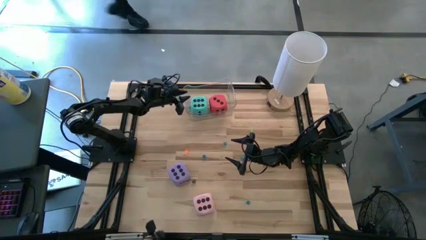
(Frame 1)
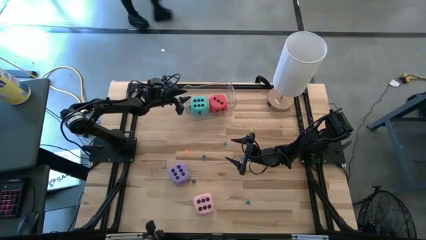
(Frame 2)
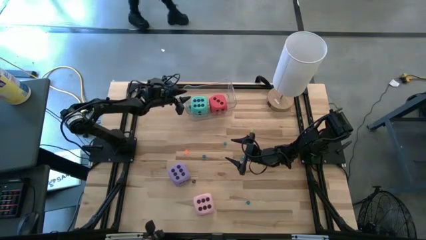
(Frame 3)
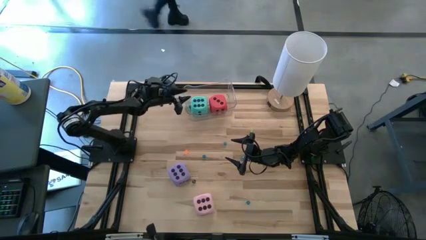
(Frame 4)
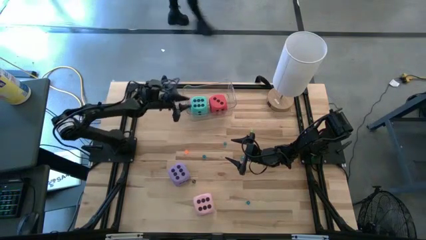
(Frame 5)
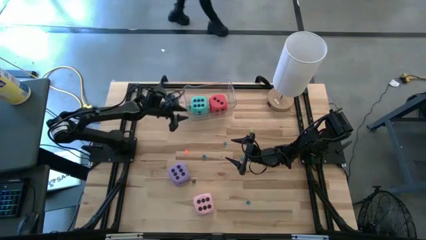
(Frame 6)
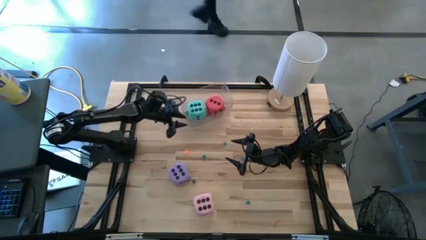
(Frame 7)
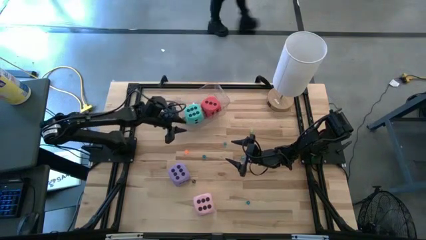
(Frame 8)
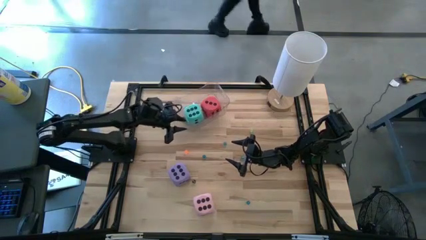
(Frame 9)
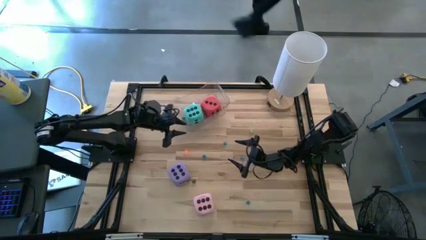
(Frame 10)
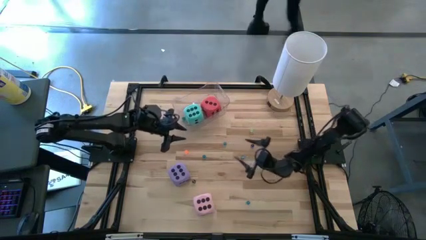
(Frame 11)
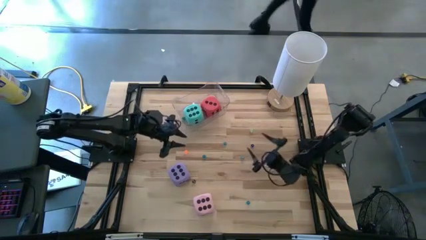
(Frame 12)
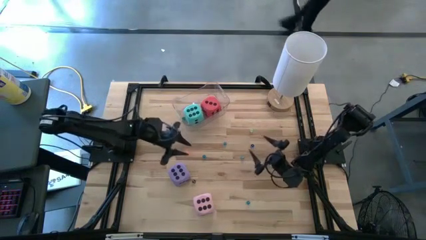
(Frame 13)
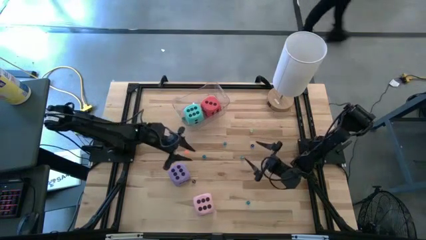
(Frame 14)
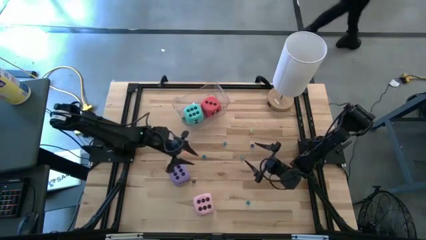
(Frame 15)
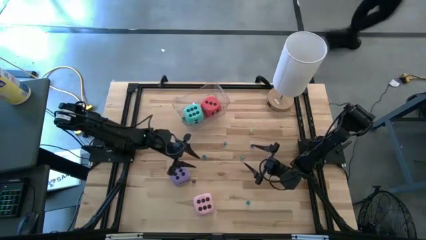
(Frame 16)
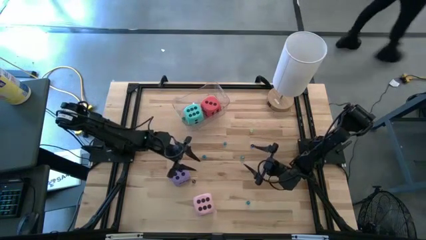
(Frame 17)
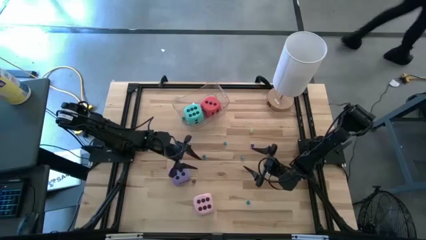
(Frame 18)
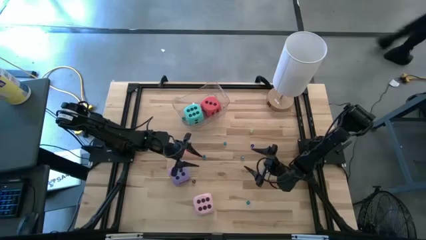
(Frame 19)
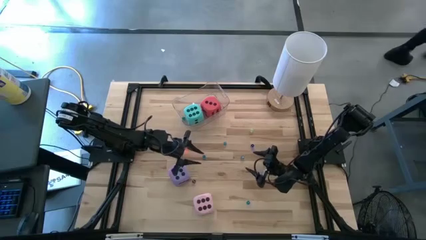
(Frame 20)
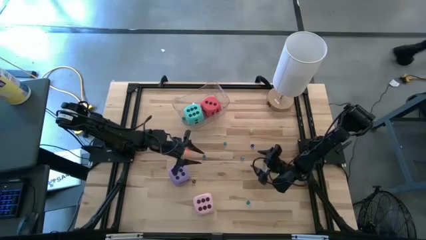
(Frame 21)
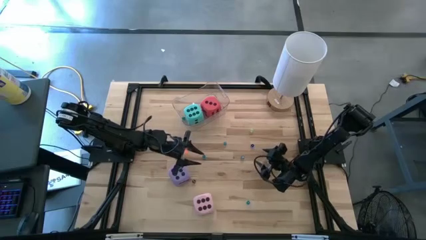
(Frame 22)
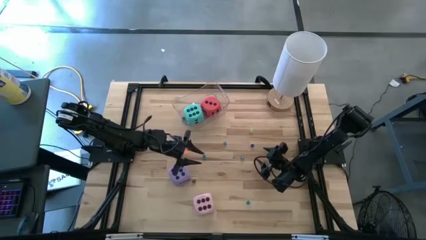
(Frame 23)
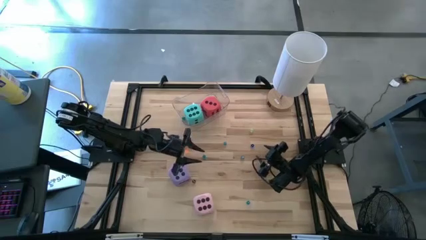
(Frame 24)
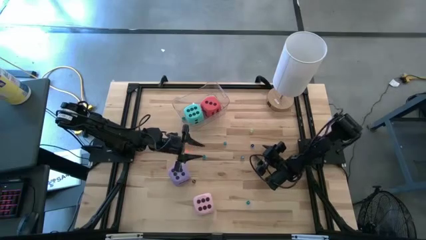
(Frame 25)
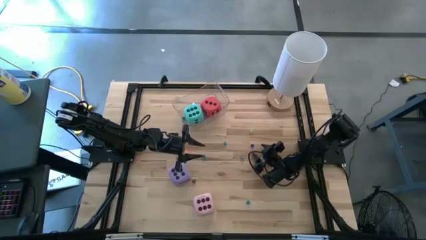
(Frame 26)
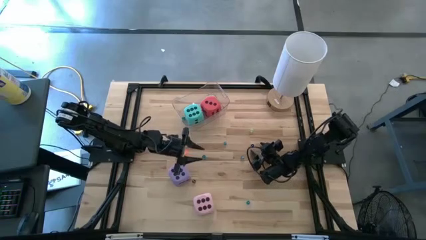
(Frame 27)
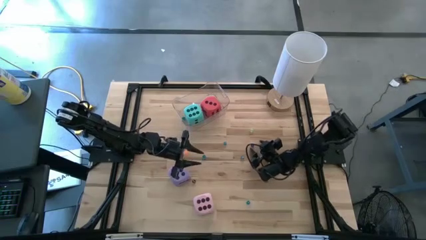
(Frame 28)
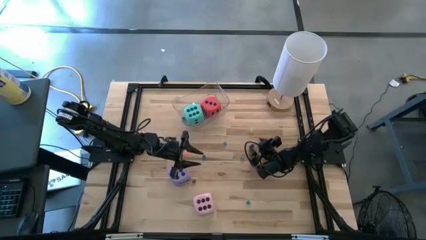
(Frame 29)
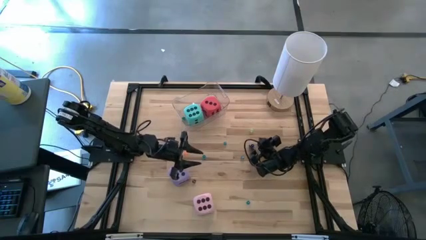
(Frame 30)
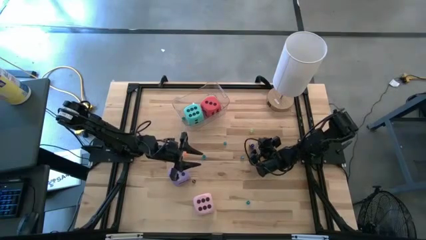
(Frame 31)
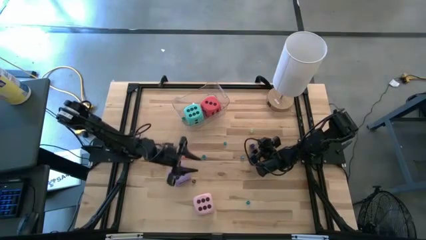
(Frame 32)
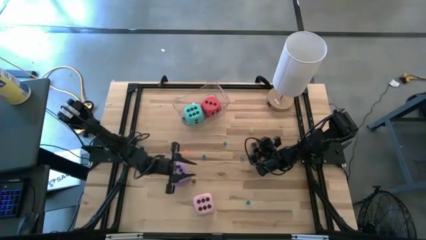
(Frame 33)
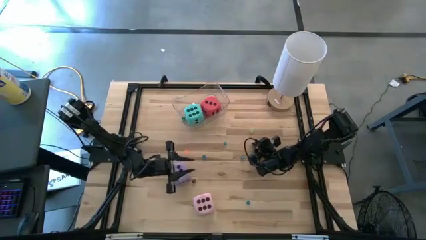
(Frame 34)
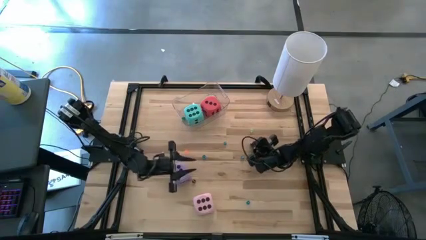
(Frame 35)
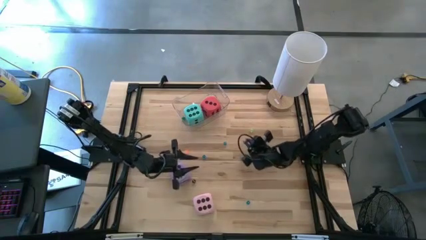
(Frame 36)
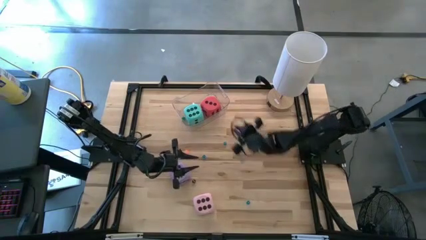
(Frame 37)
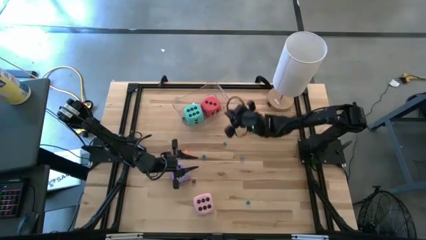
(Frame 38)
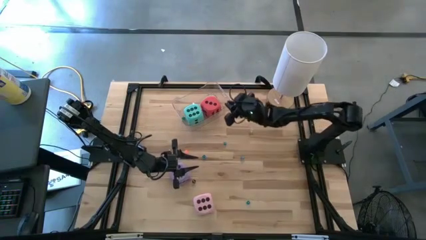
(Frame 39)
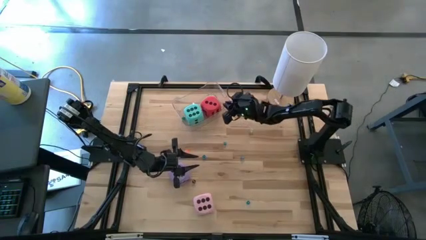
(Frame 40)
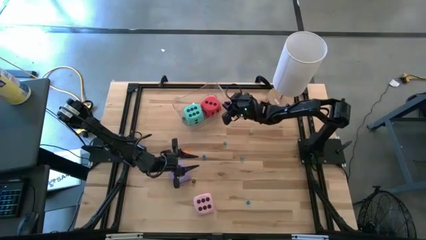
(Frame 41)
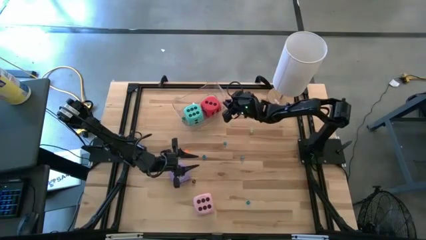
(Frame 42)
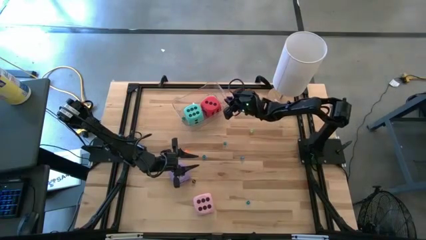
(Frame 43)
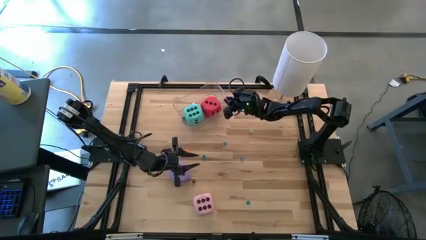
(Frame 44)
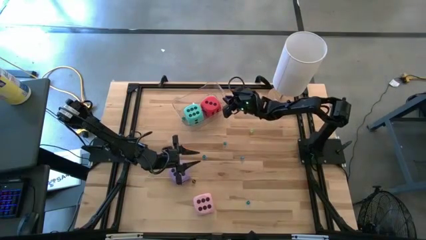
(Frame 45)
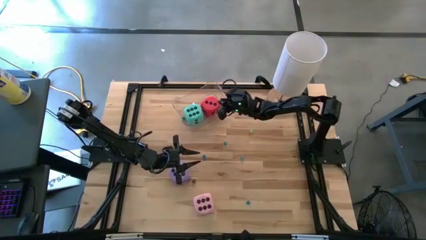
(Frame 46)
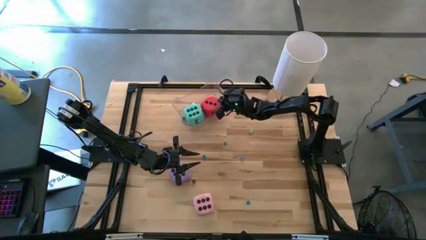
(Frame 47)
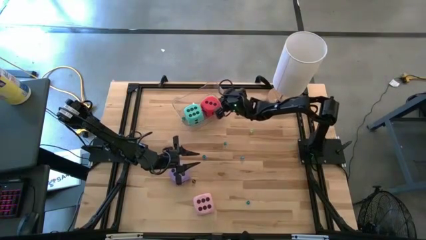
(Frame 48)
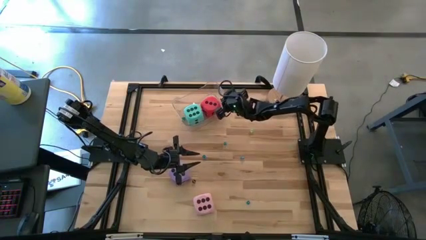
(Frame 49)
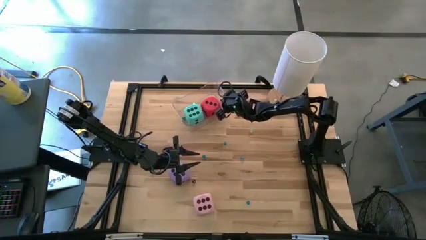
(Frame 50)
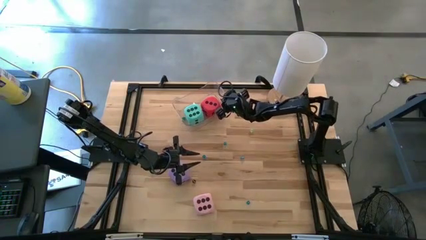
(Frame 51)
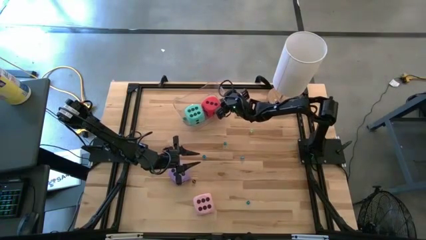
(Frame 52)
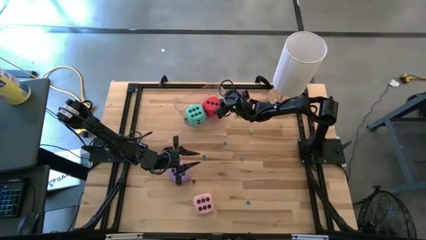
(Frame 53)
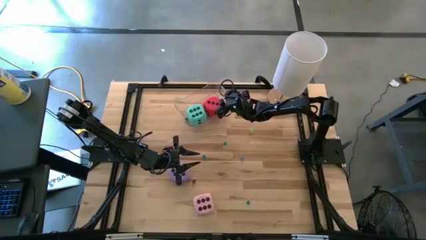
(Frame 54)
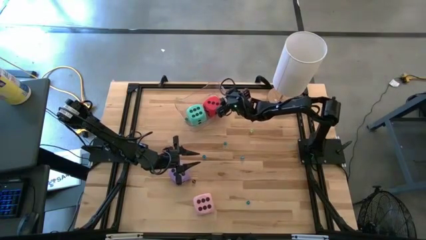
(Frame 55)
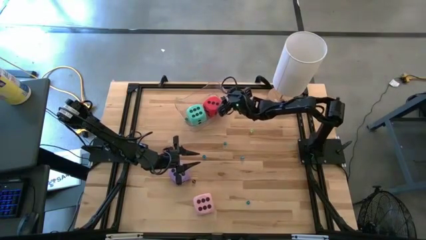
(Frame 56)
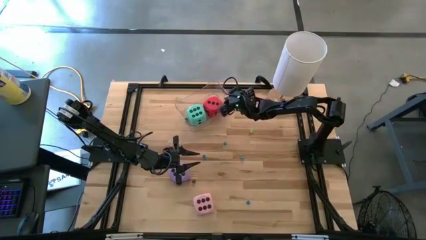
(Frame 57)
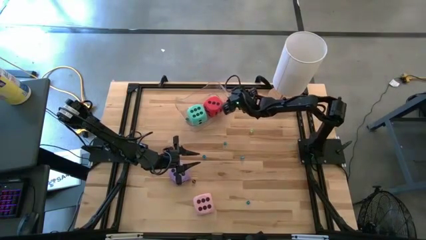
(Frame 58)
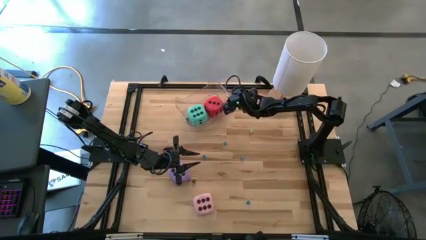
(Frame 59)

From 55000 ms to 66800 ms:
Task: Pick & Place Dice
Put the small dark blue dice in the transparent bin

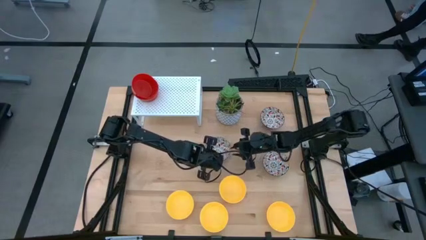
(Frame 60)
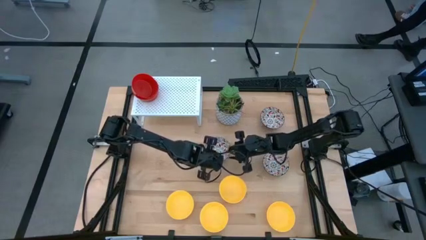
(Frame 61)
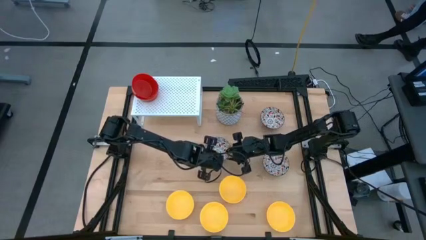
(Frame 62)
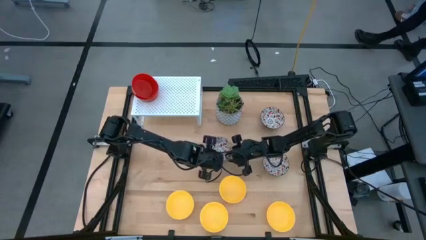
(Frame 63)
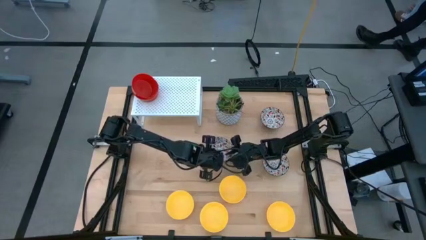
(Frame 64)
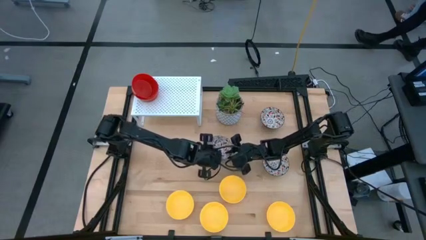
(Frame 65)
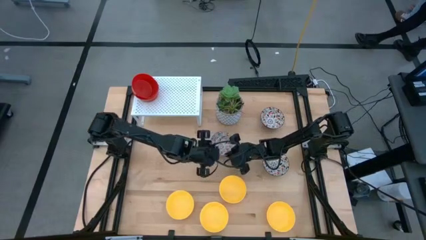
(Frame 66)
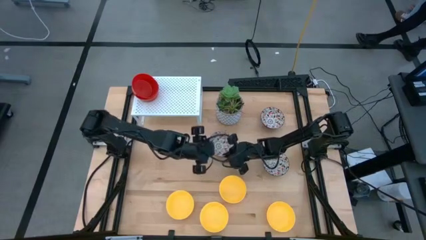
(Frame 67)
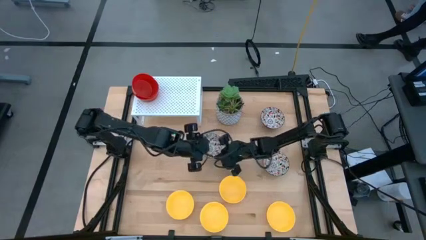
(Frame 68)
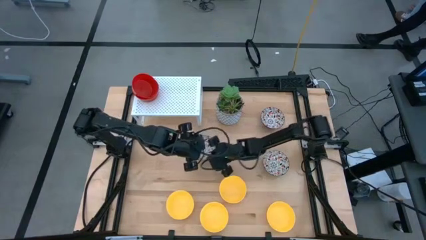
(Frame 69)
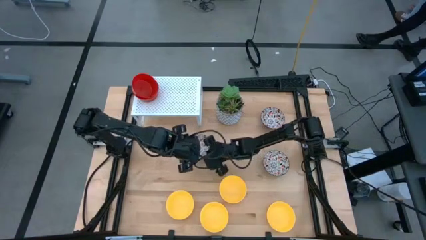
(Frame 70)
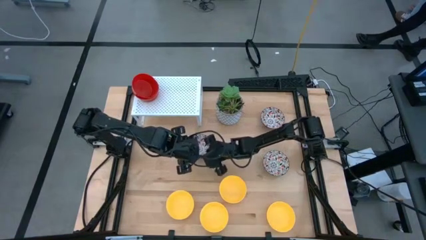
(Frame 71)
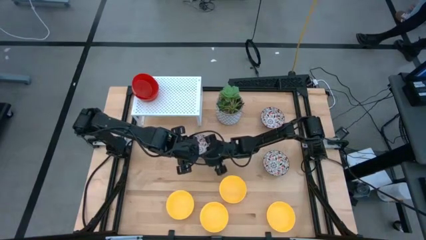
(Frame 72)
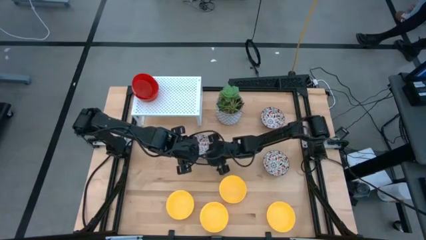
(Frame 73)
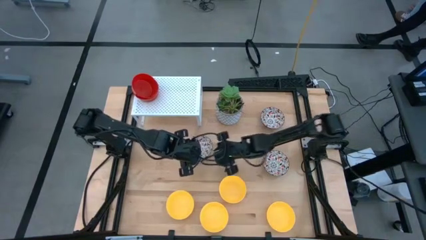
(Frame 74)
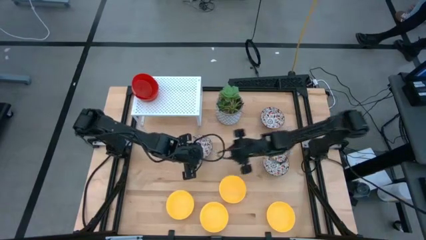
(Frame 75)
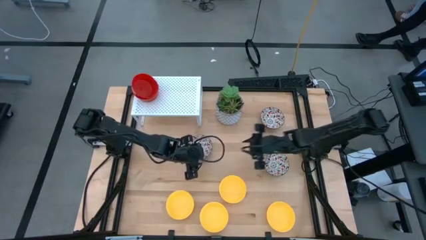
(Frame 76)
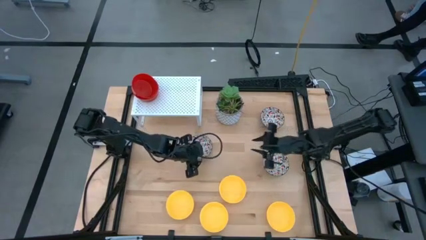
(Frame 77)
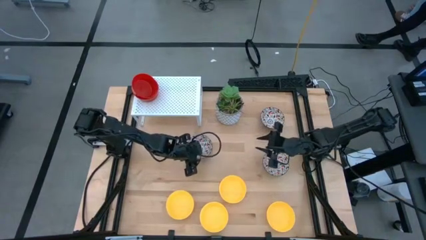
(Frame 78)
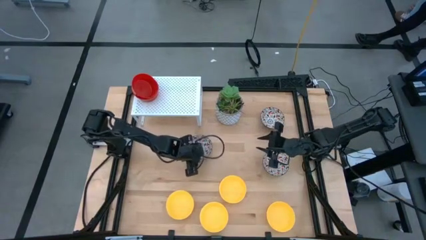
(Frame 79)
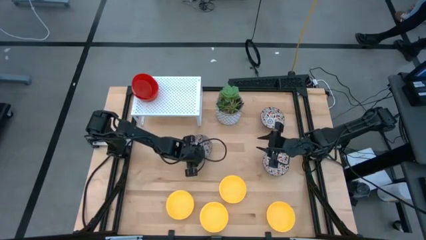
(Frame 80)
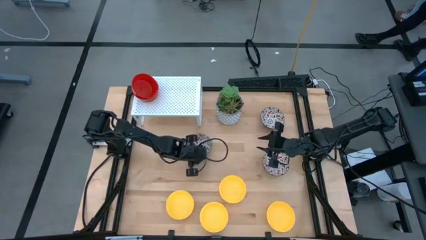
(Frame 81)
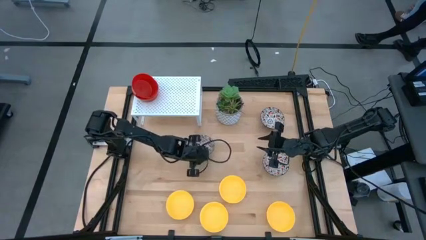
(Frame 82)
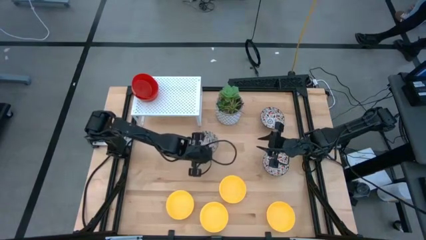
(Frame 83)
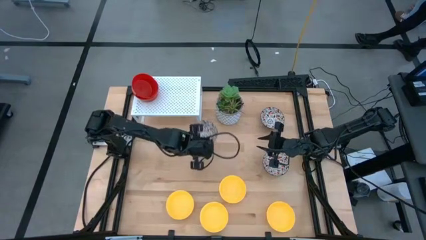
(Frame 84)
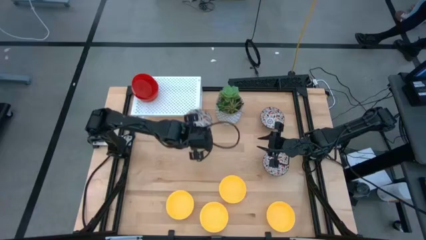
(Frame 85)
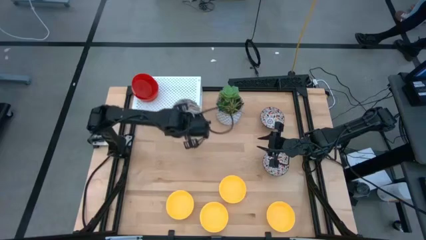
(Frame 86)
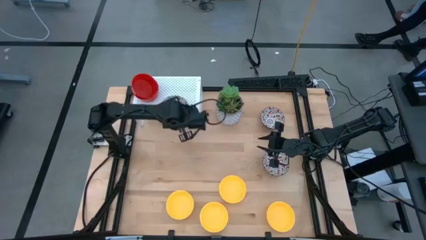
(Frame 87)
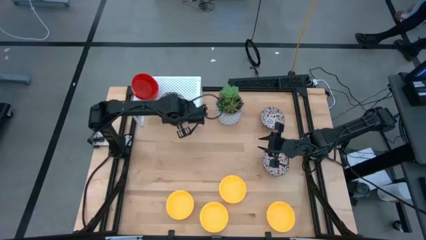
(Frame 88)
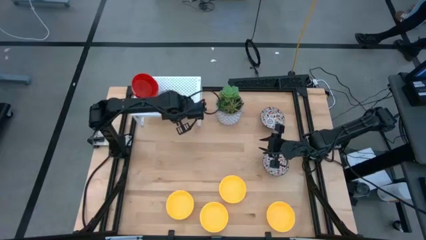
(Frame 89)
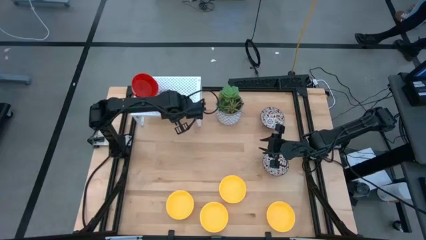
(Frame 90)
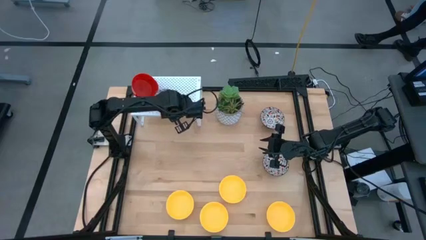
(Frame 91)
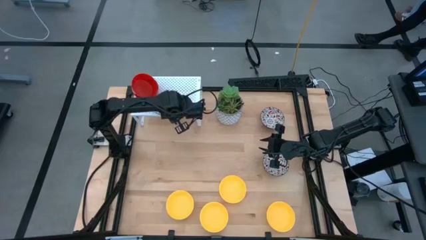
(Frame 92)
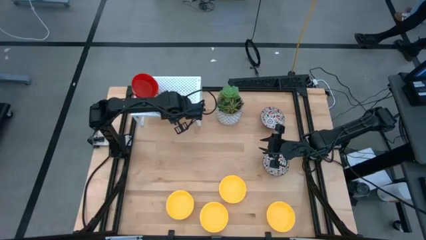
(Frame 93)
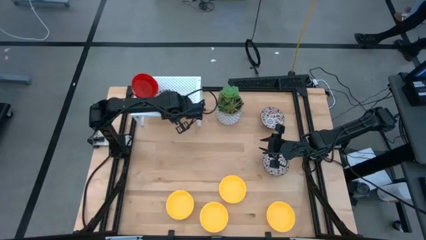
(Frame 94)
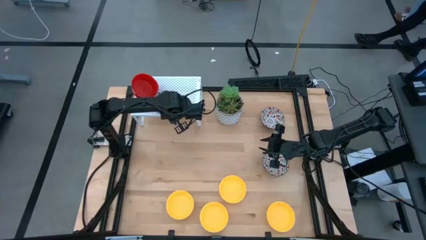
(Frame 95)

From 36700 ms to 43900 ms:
Task: Pick & Place Mini bowls
Put the white patterned bowl on the shelf
